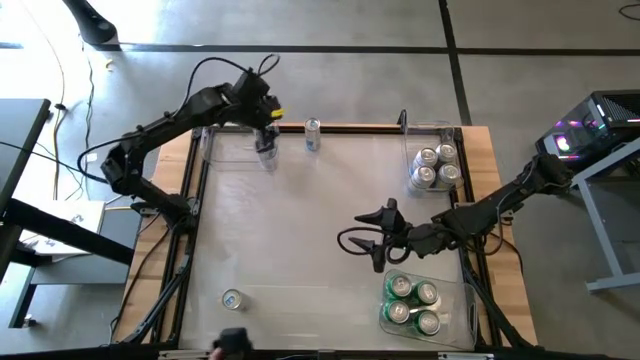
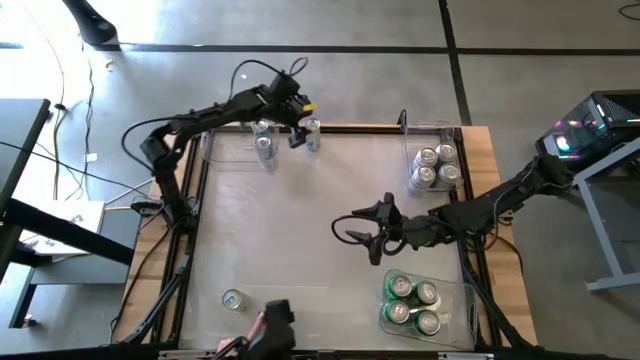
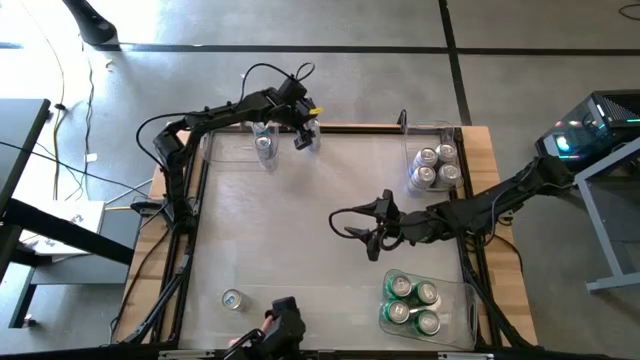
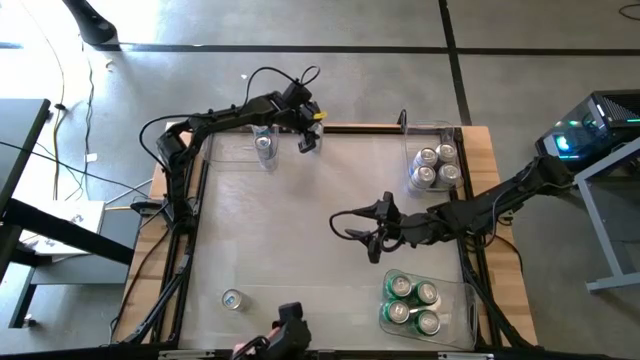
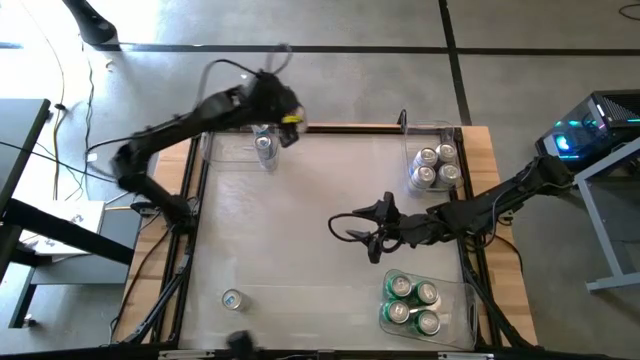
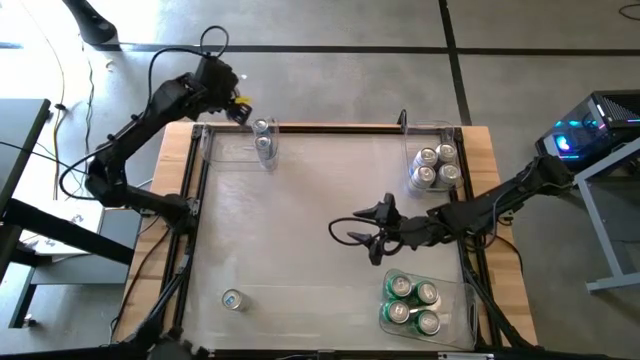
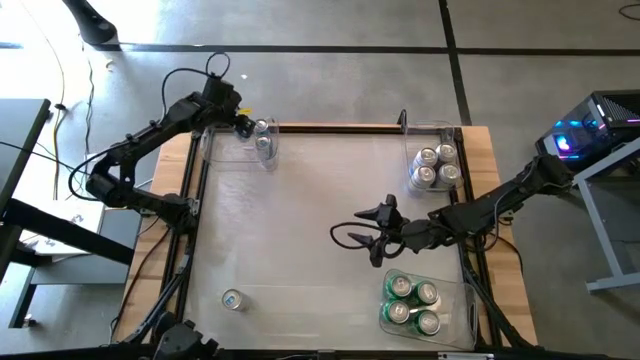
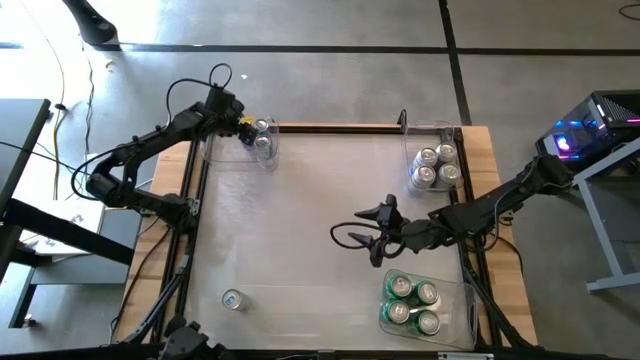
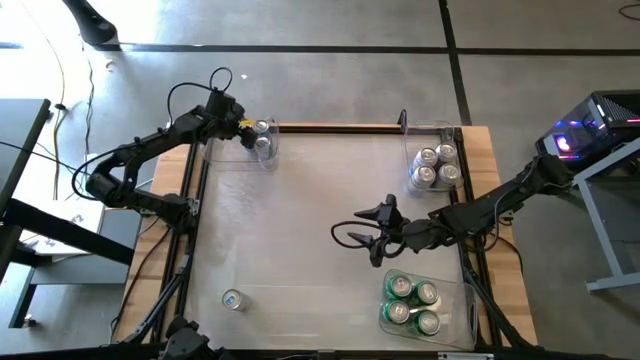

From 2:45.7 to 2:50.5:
Task: Sort soda cans
Put the top white blue soda can into the top left transparent bin

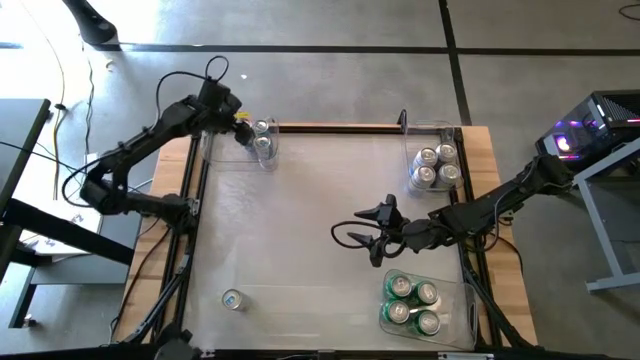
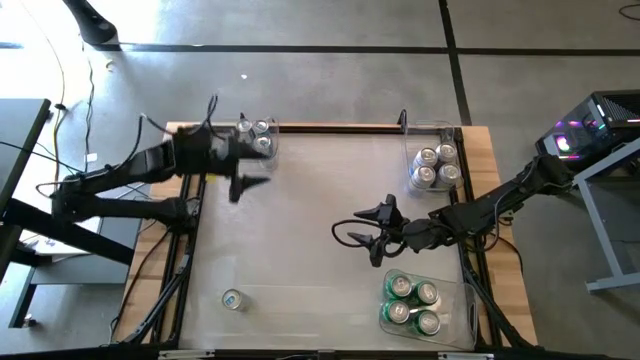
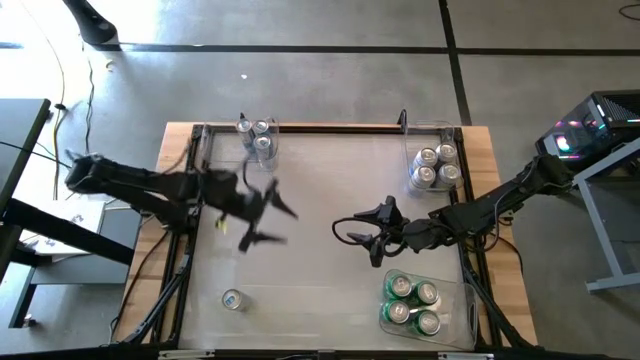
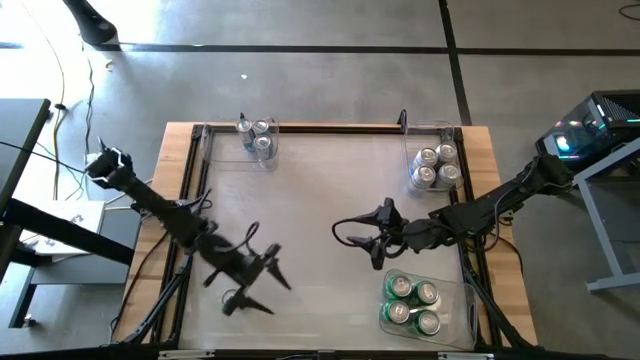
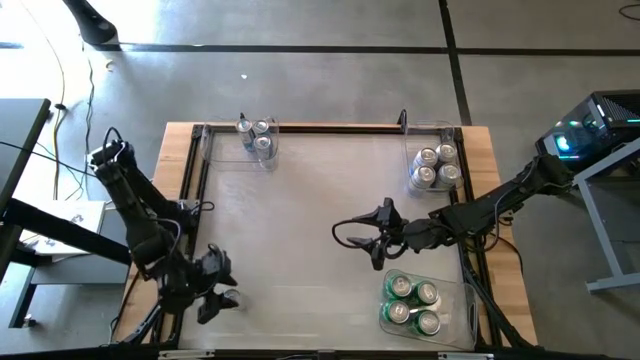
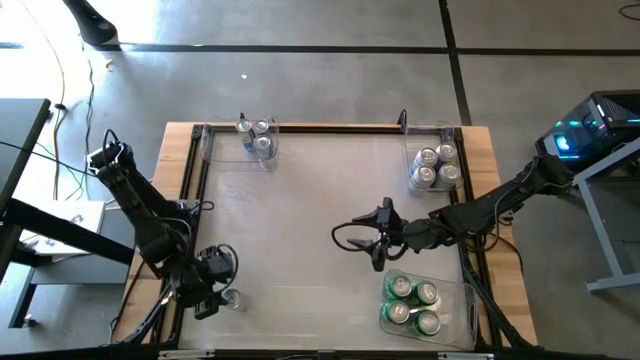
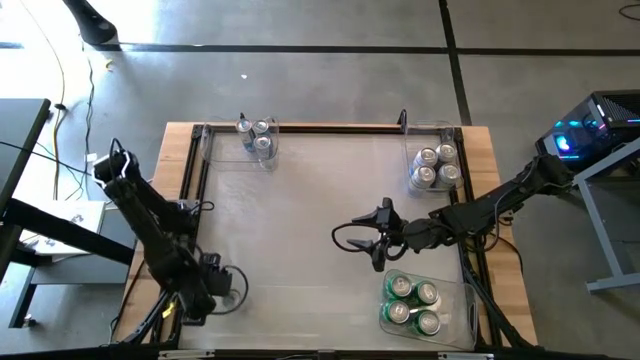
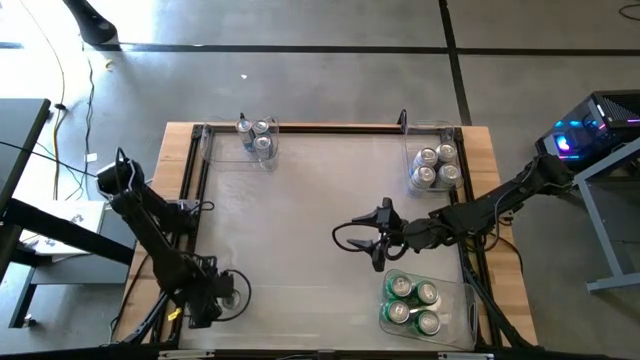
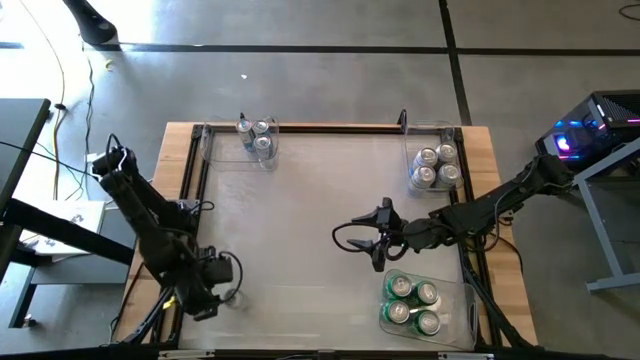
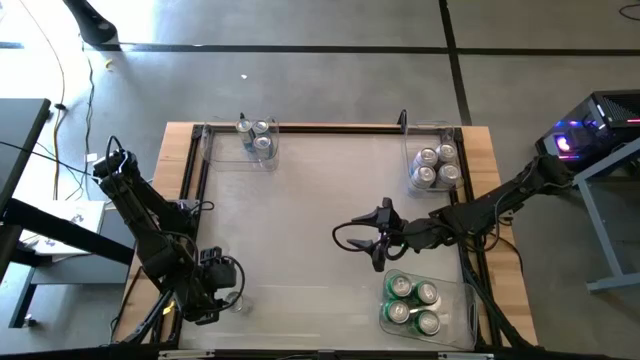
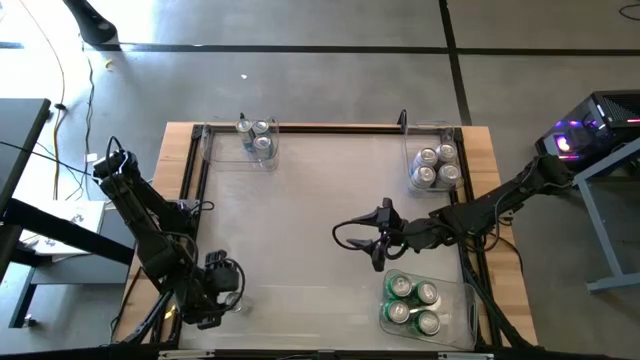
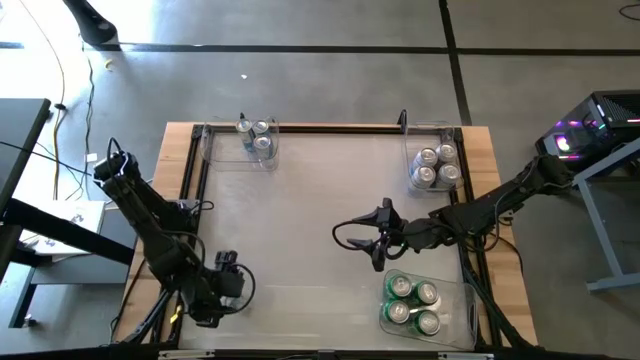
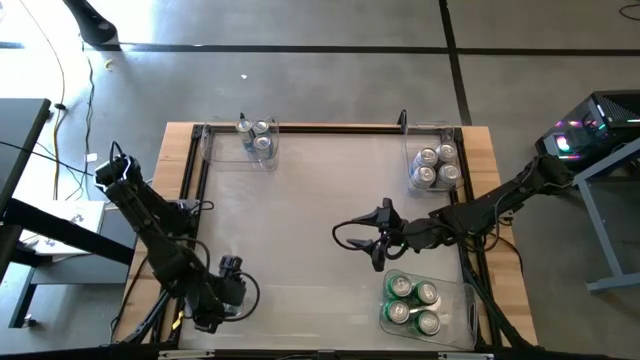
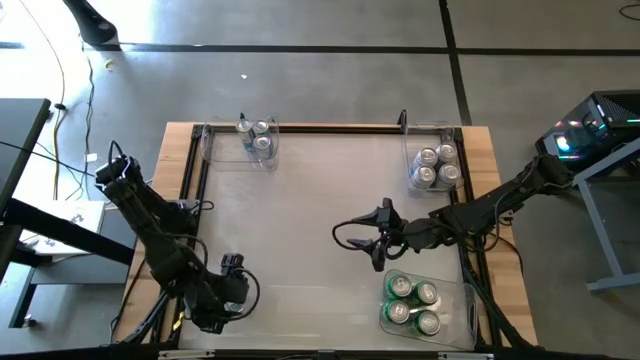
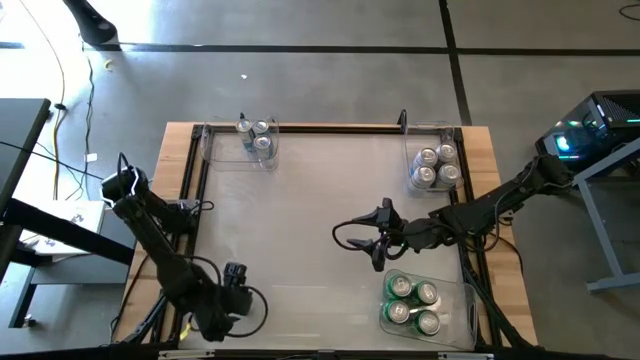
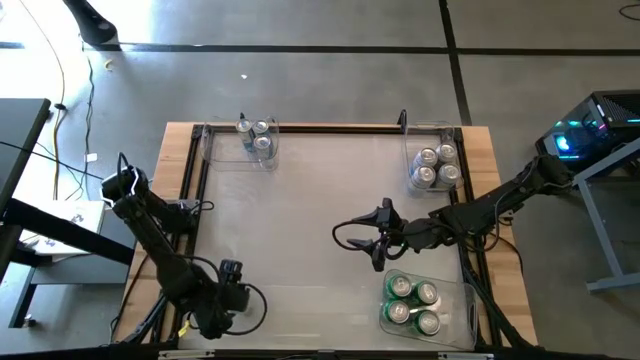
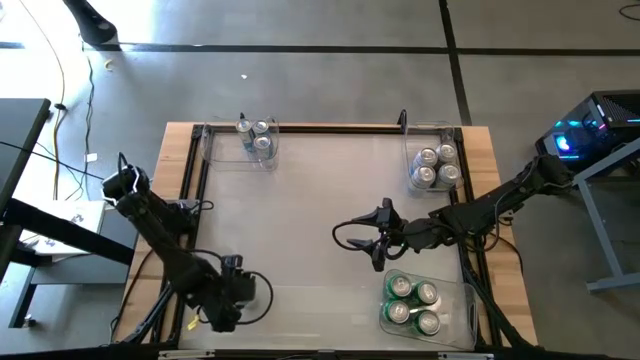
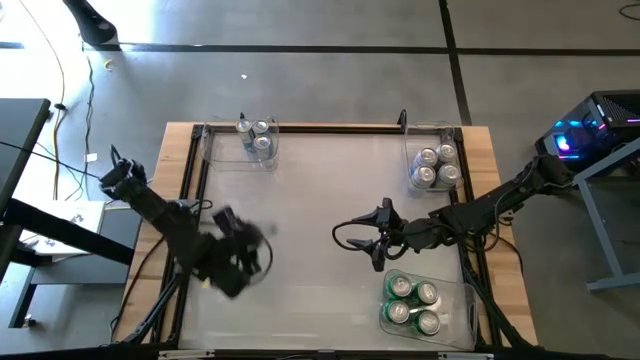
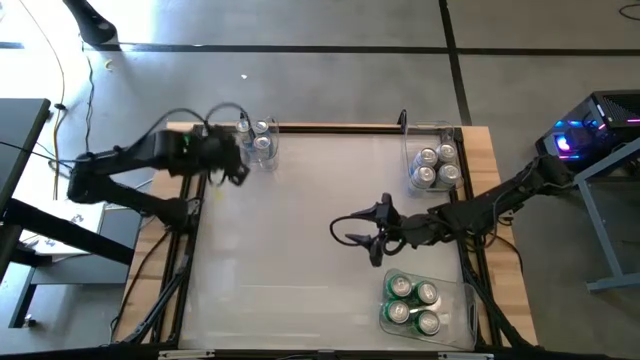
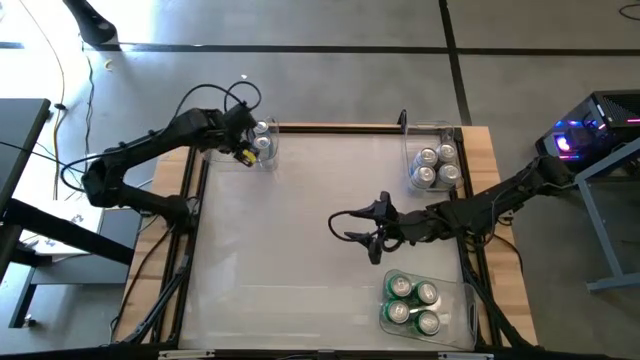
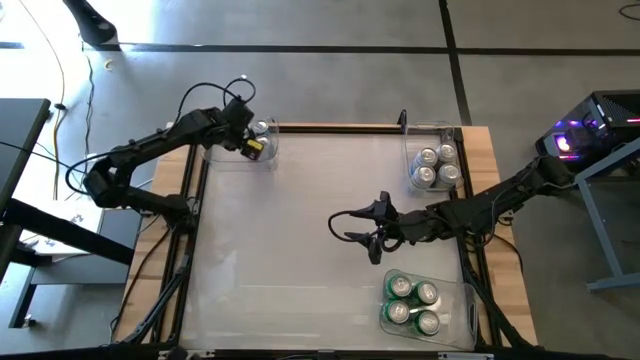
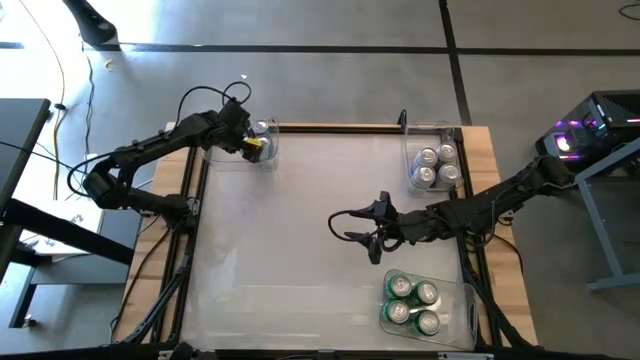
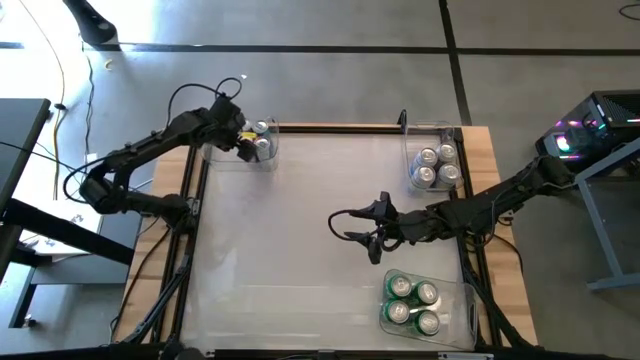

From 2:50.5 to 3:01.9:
Put the bottom white blue soda can into the top left transparent bin

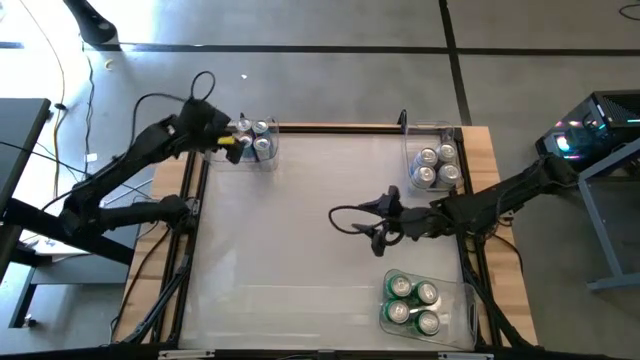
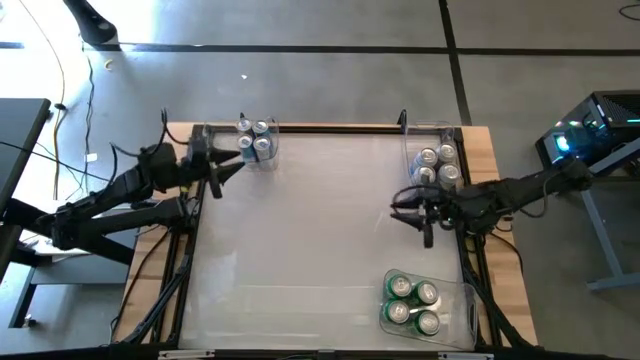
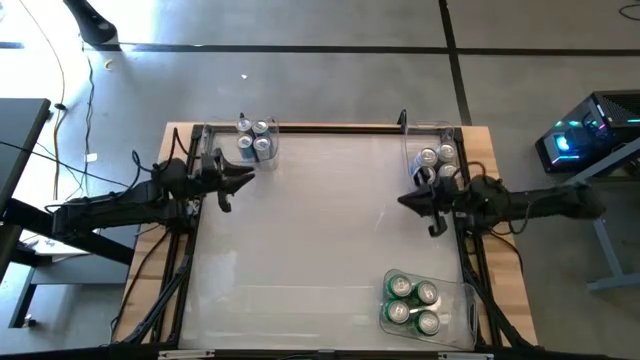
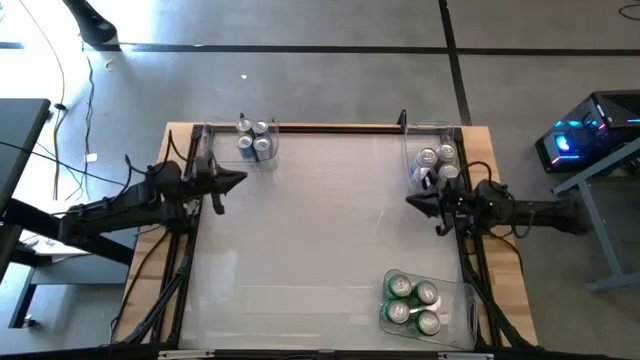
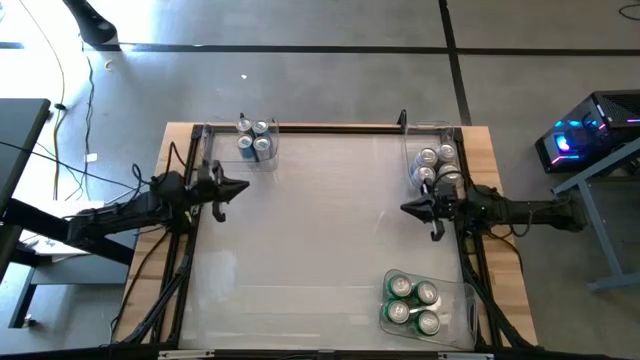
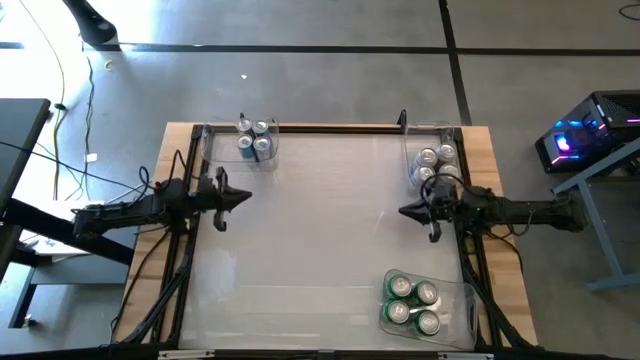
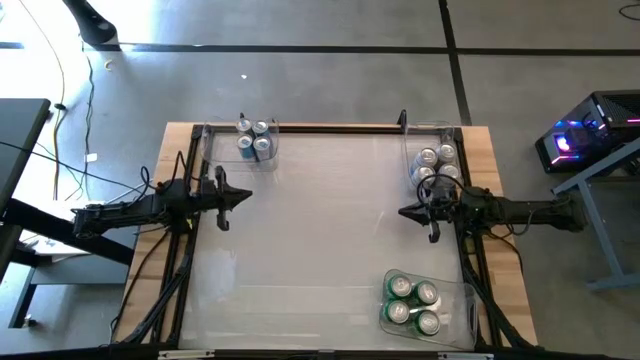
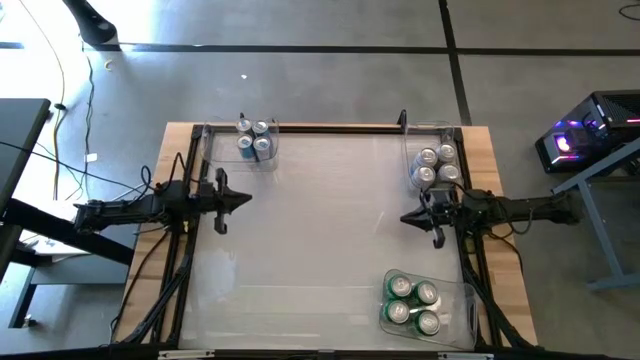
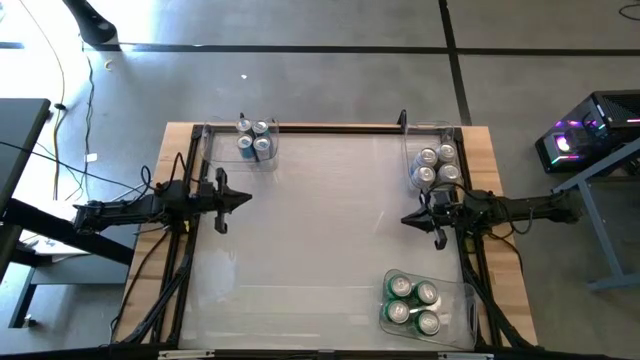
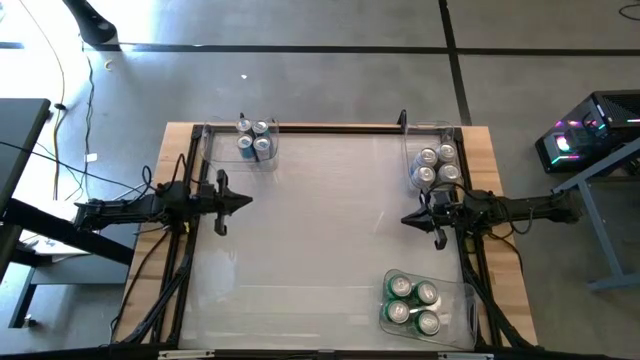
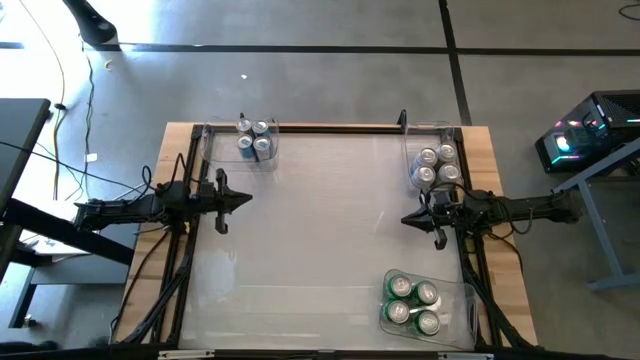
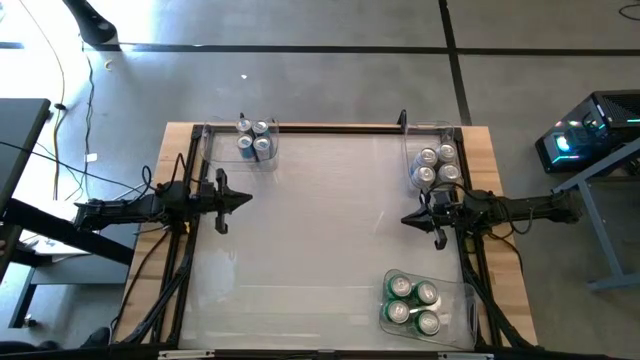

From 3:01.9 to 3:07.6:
Return to Home Position
